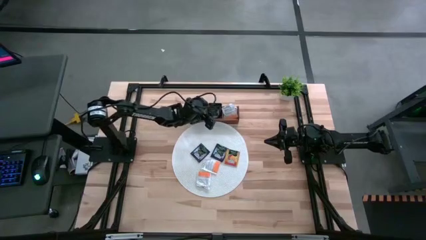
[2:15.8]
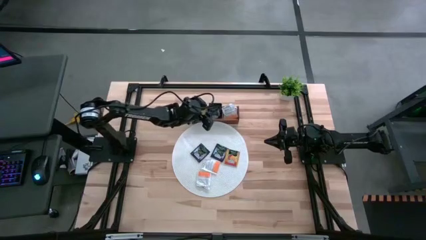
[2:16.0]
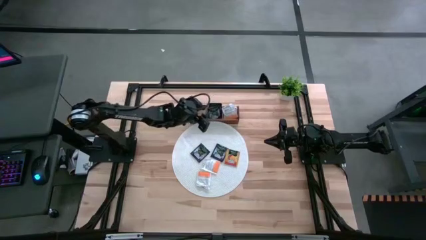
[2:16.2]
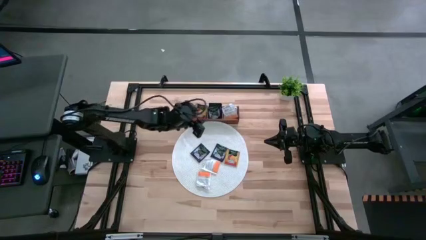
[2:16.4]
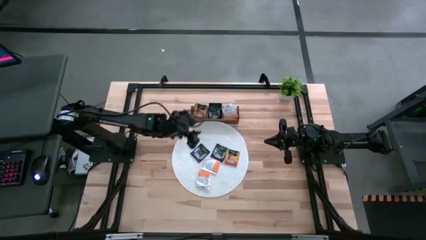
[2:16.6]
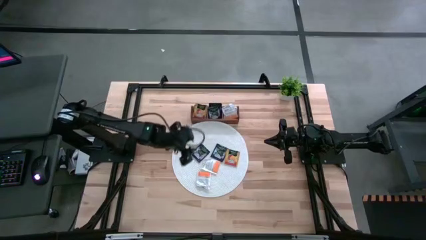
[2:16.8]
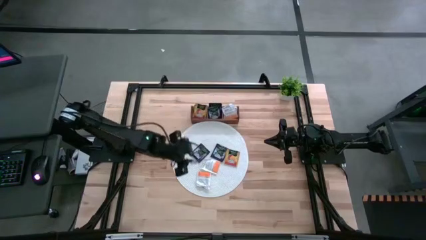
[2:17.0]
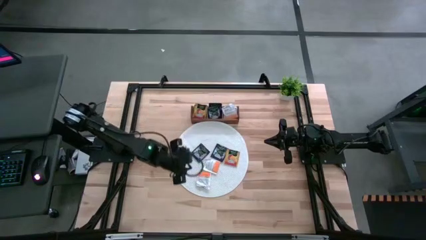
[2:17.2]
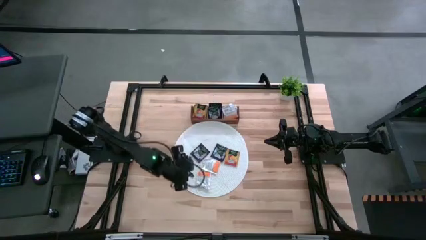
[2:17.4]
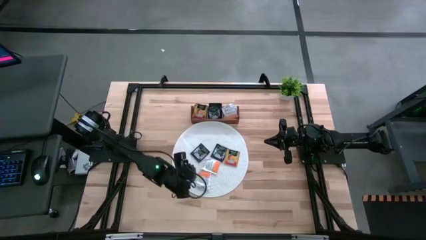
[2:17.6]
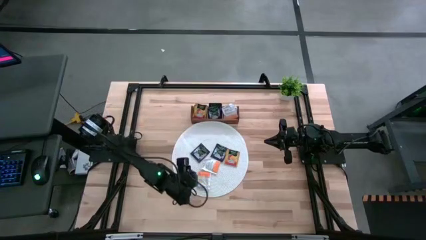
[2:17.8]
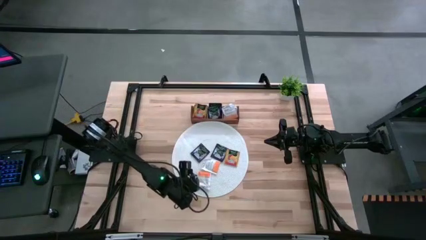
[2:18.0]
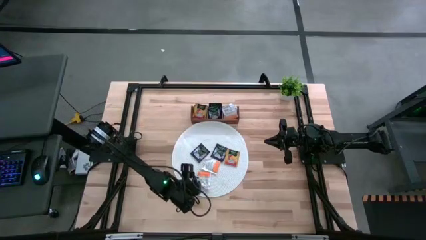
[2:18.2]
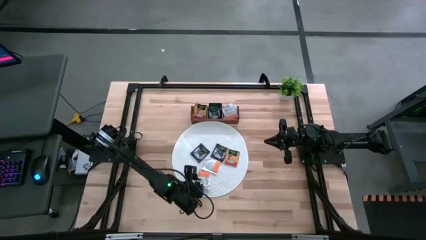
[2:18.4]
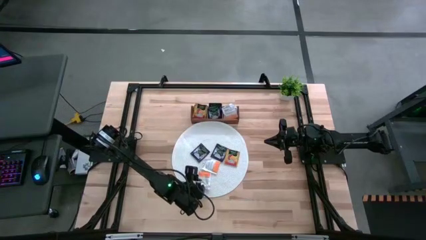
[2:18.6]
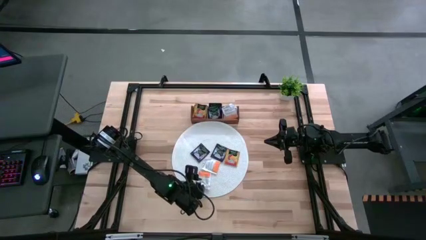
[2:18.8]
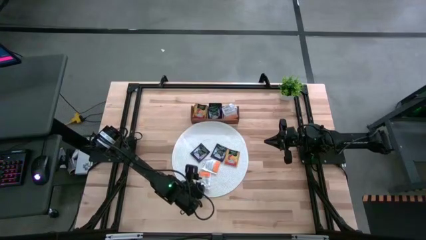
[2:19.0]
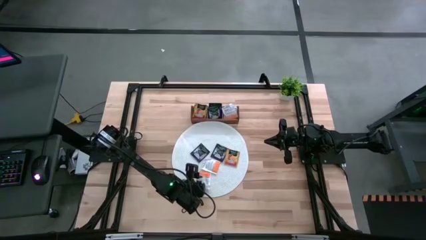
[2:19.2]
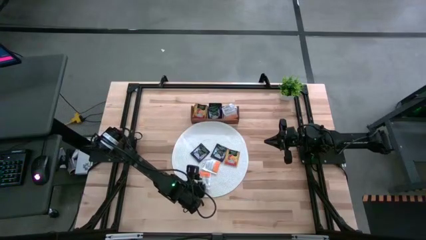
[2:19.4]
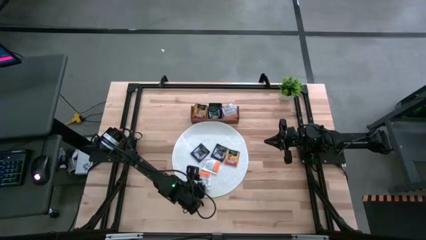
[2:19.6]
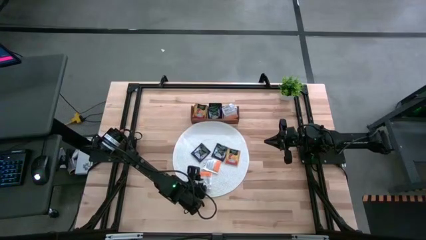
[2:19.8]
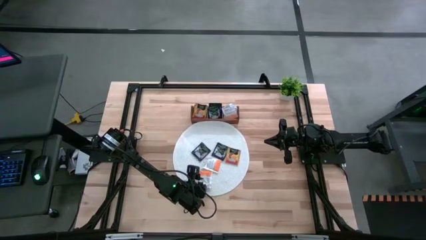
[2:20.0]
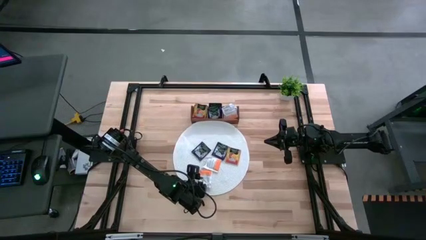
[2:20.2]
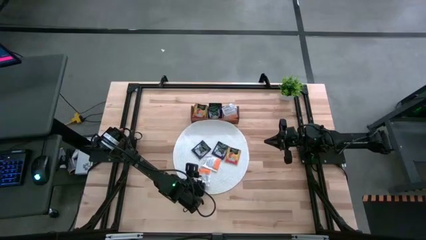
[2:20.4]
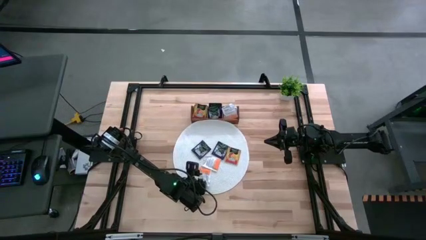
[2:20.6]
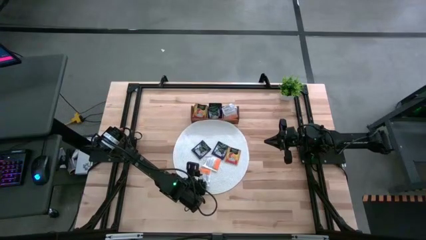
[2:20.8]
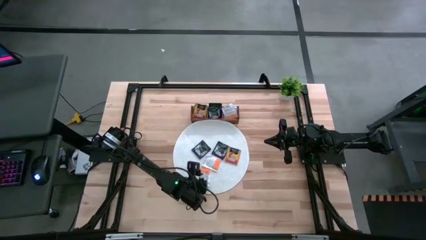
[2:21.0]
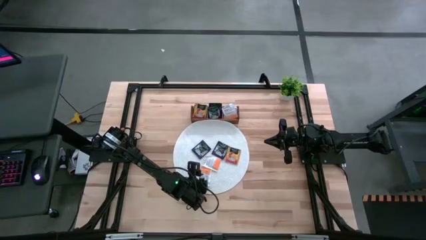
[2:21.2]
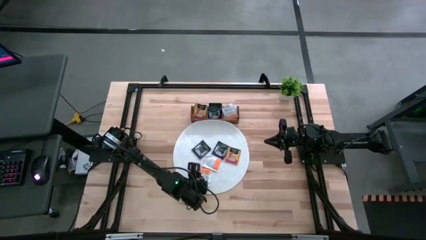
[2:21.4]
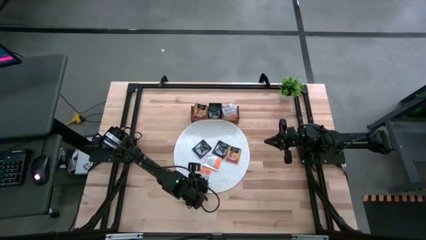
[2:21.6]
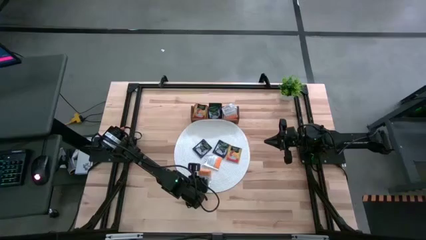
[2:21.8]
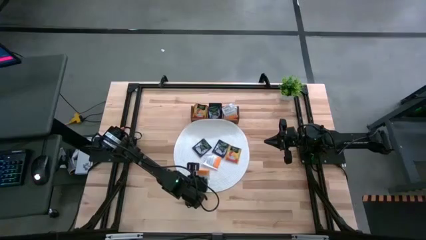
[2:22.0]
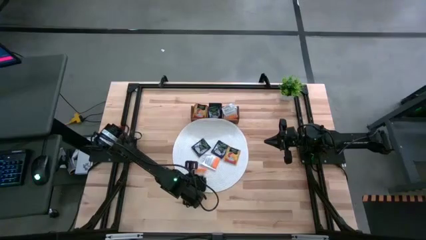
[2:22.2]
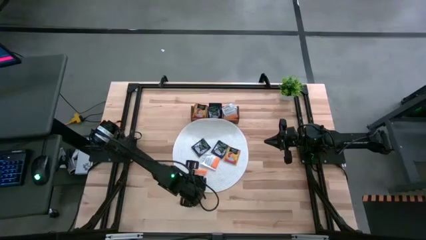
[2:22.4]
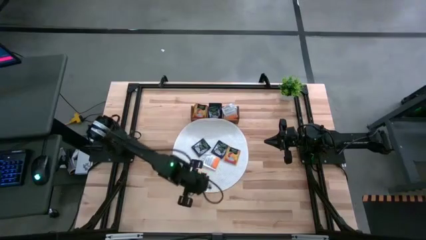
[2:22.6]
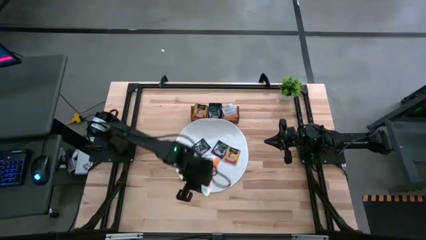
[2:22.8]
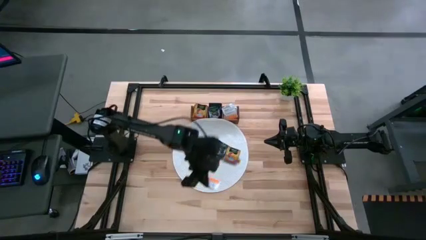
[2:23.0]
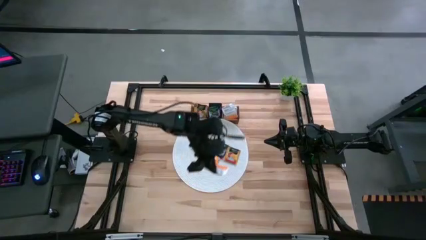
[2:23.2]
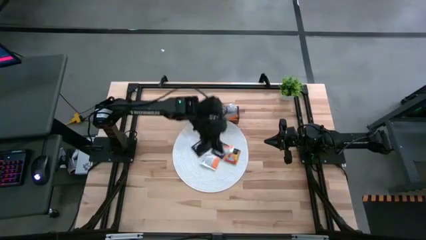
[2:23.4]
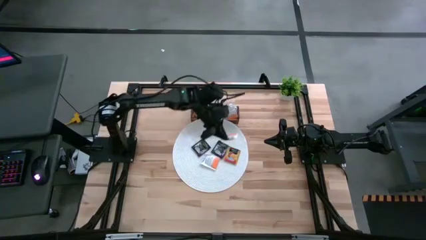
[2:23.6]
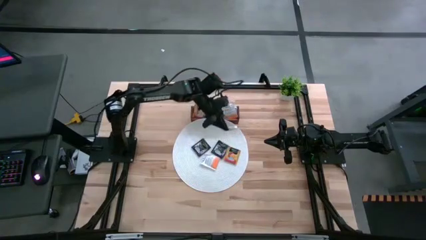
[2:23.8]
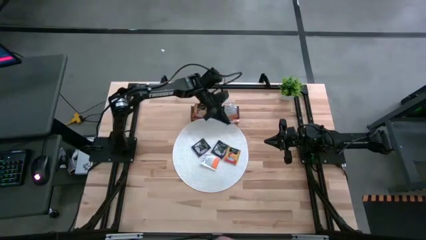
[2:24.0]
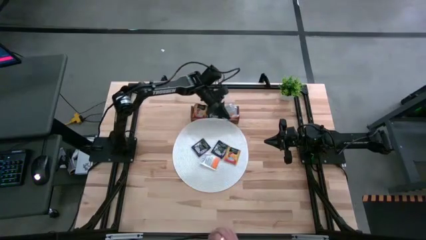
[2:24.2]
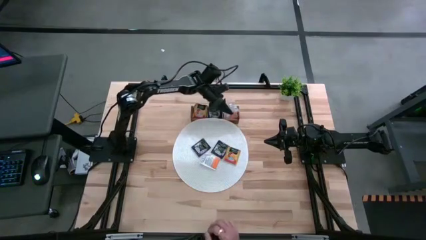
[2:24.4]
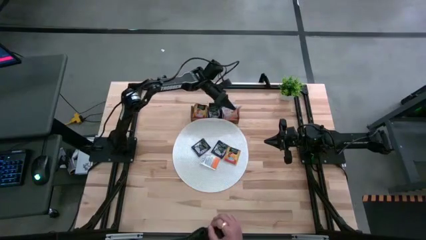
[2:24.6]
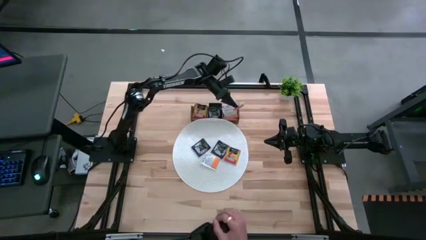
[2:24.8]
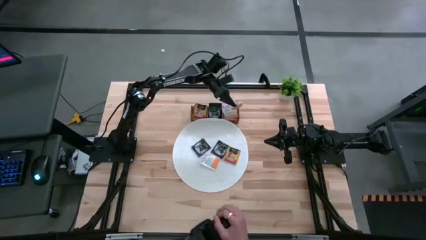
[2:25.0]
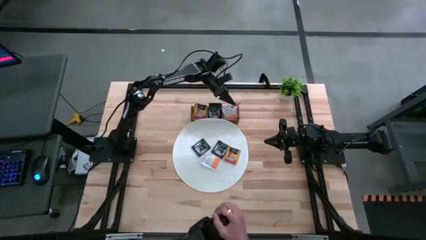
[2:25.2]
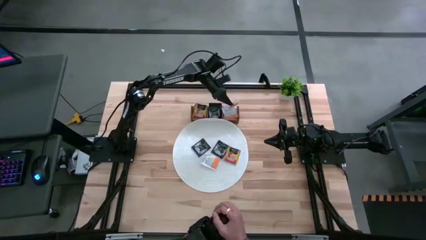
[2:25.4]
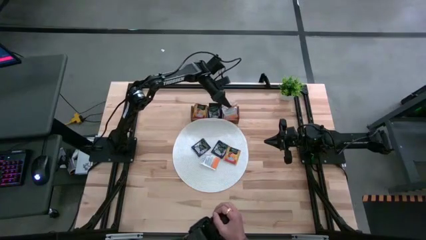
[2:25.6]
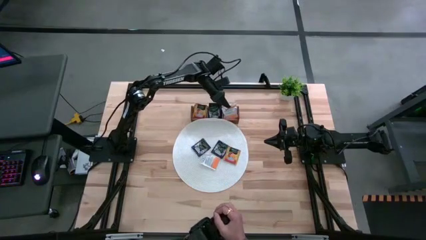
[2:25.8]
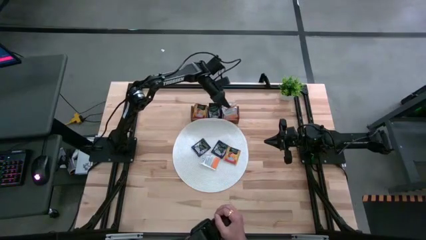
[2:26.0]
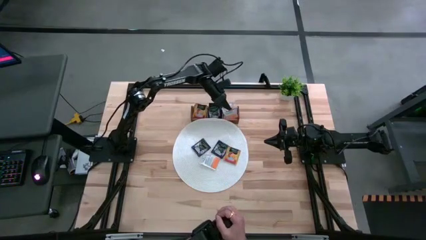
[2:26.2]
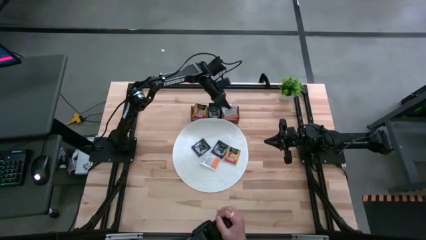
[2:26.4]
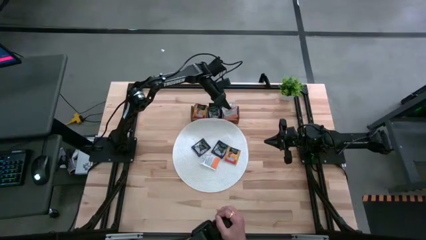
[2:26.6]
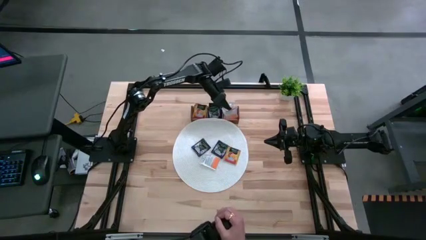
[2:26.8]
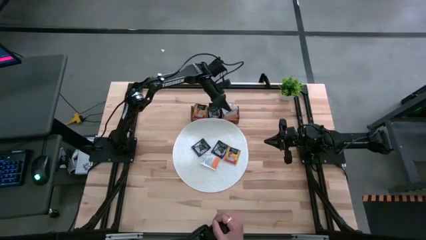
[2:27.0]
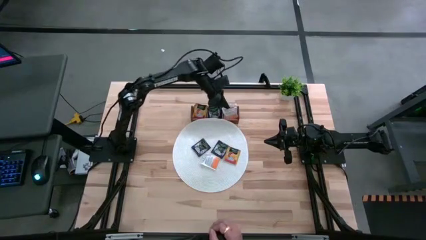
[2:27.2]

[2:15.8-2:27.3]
Task: Pick & Place Tea
Put the white tea bag into the right section of the wooden organizer
